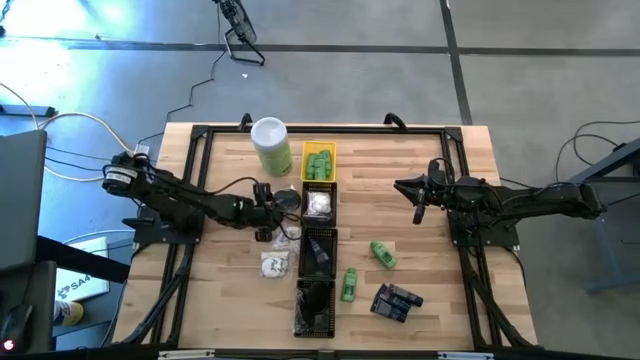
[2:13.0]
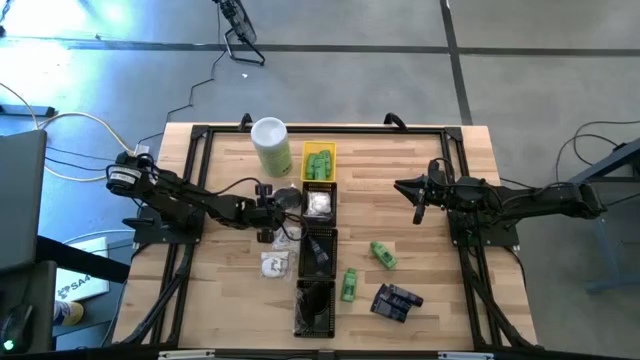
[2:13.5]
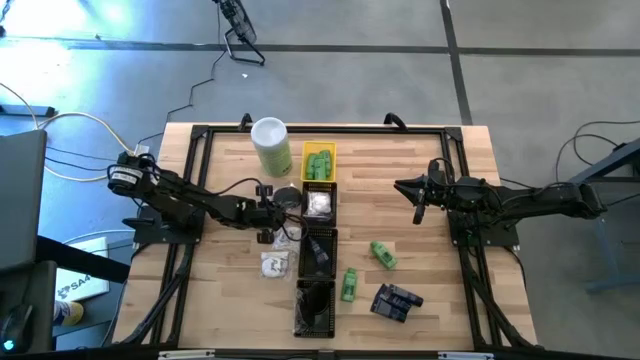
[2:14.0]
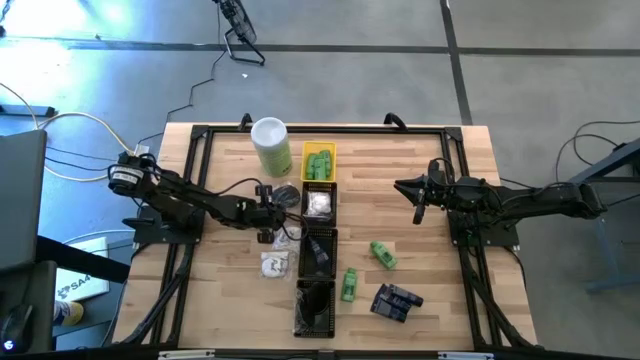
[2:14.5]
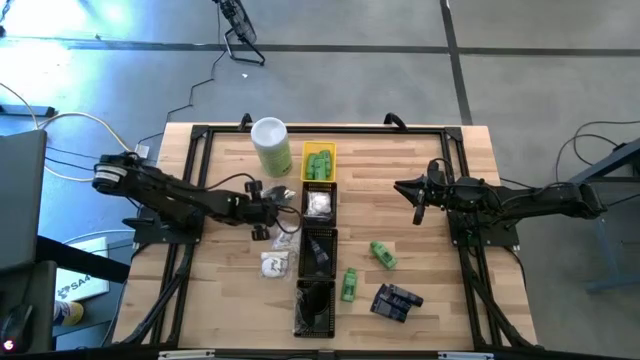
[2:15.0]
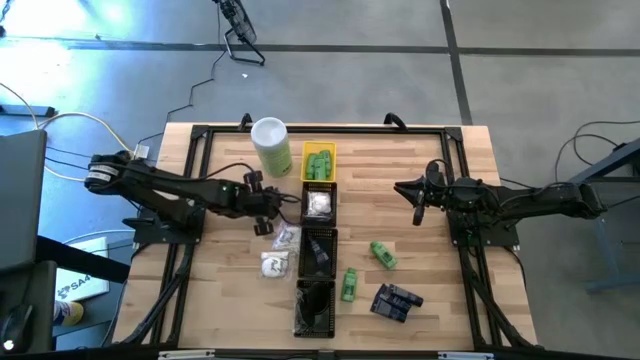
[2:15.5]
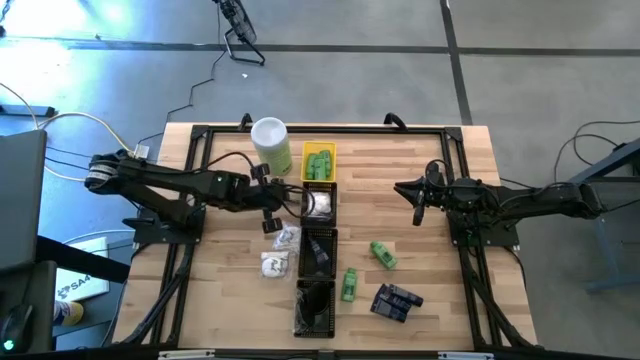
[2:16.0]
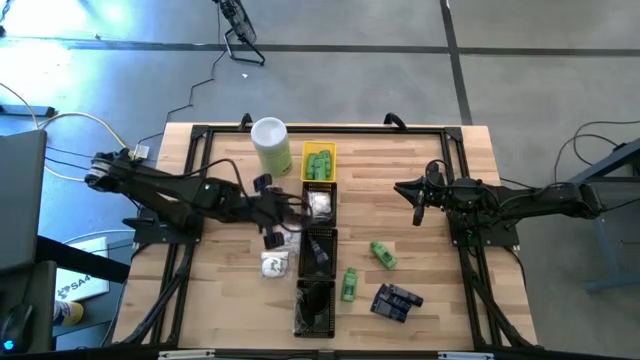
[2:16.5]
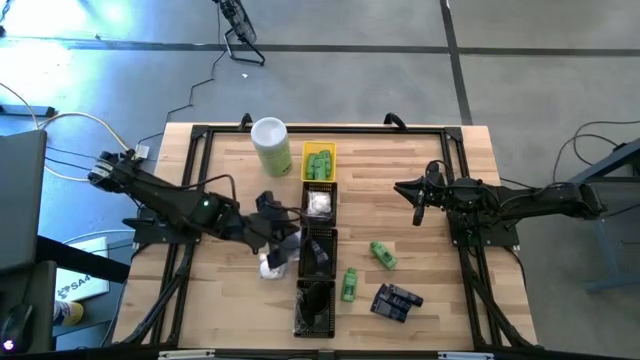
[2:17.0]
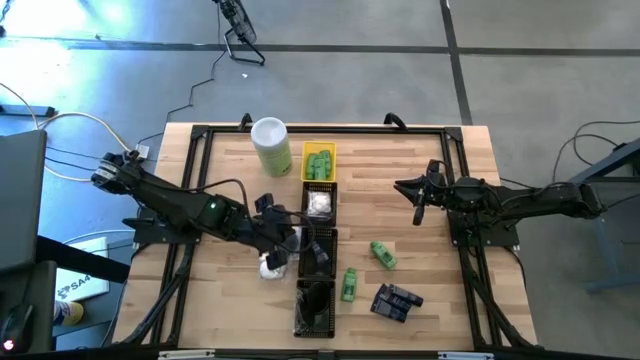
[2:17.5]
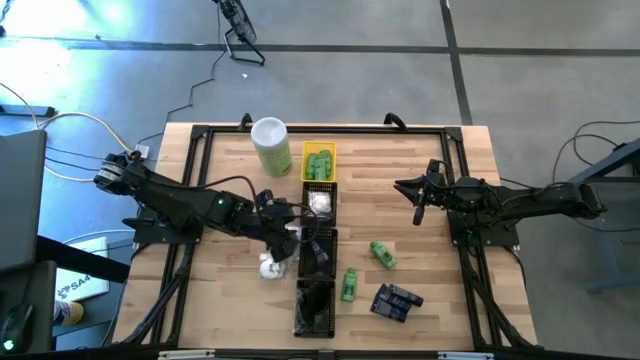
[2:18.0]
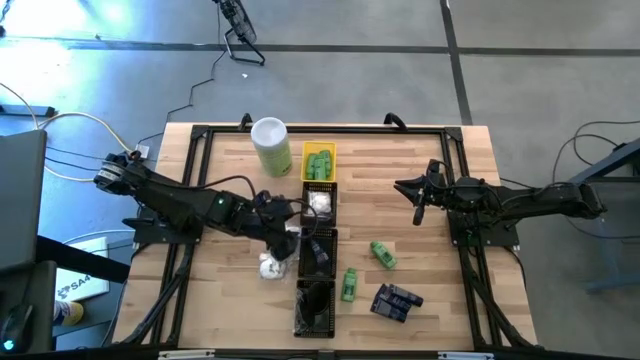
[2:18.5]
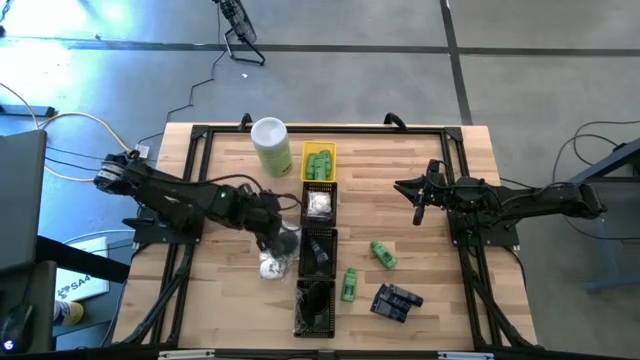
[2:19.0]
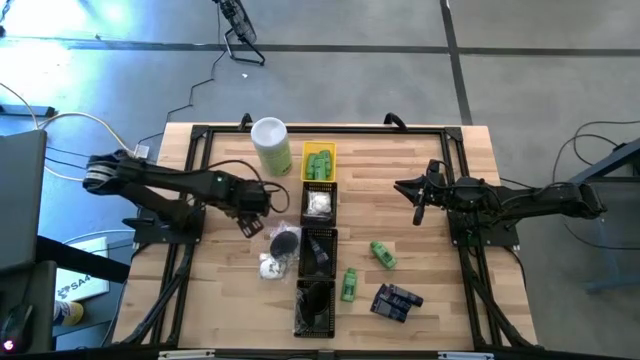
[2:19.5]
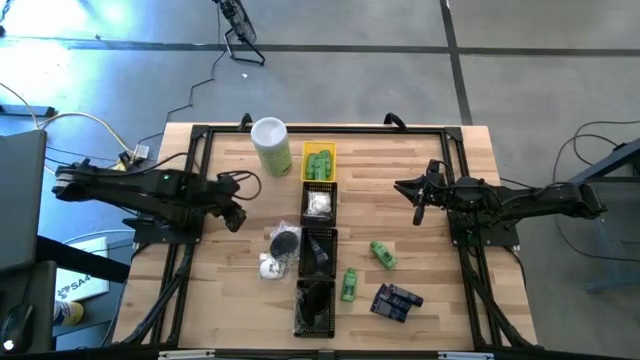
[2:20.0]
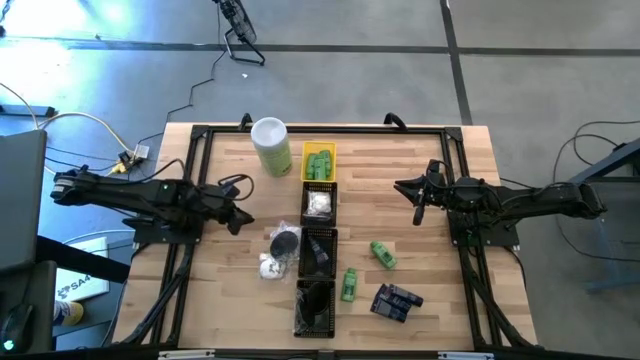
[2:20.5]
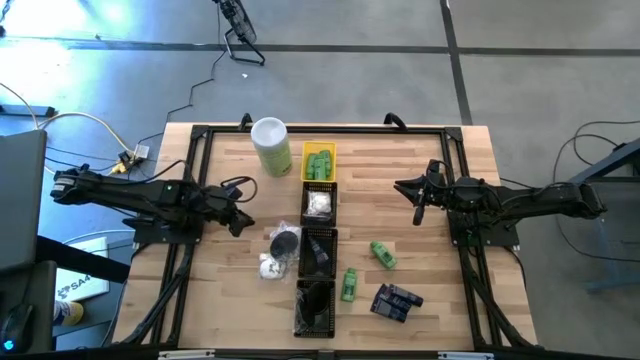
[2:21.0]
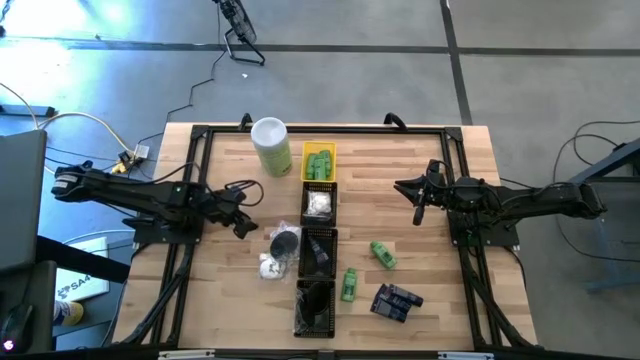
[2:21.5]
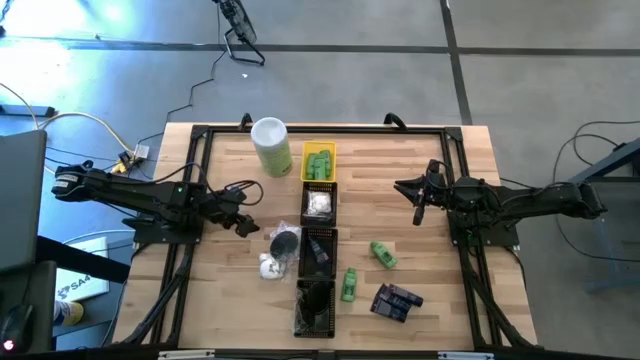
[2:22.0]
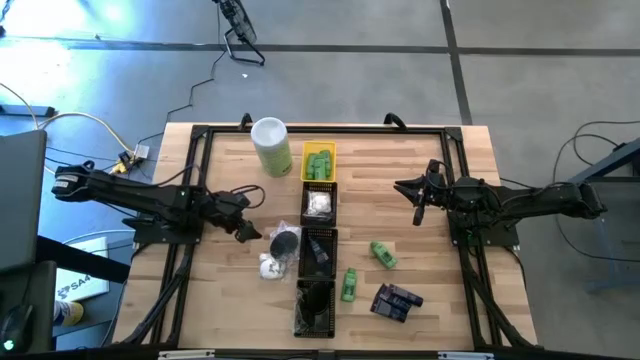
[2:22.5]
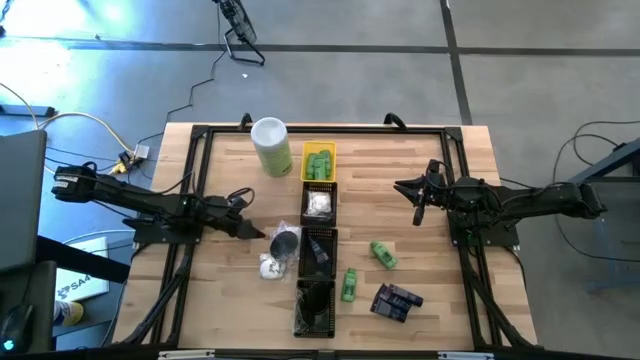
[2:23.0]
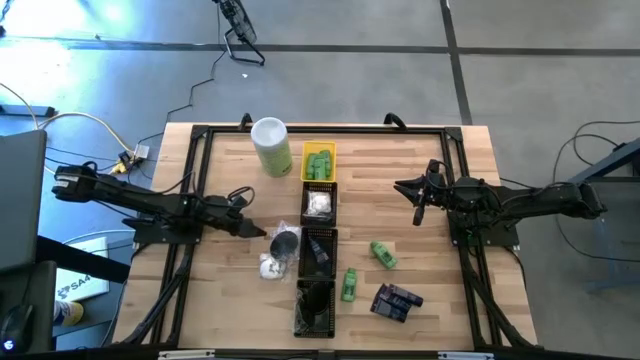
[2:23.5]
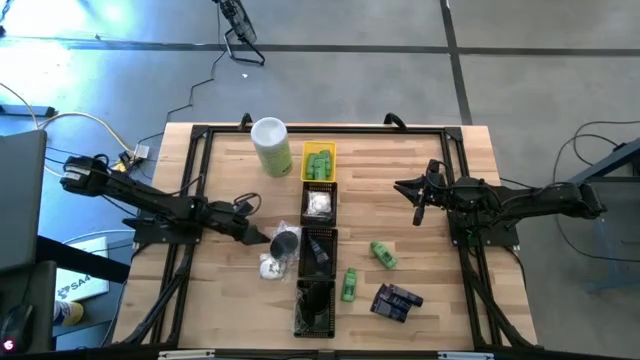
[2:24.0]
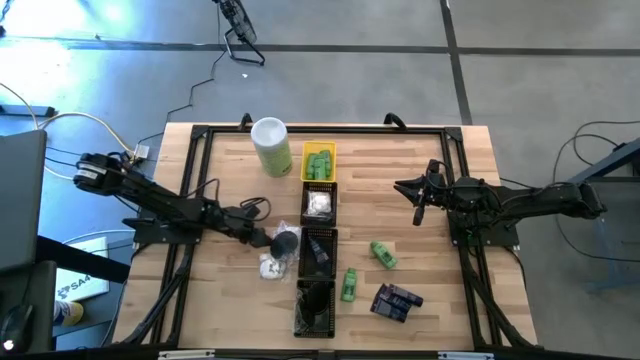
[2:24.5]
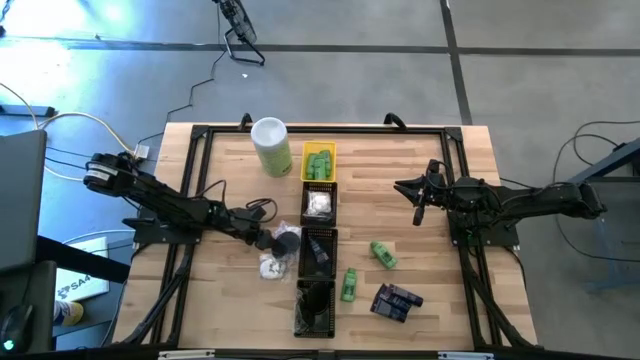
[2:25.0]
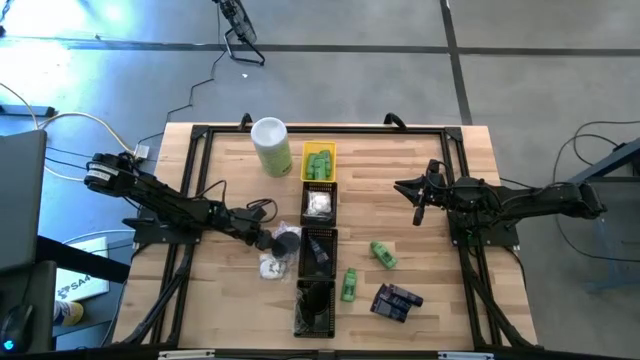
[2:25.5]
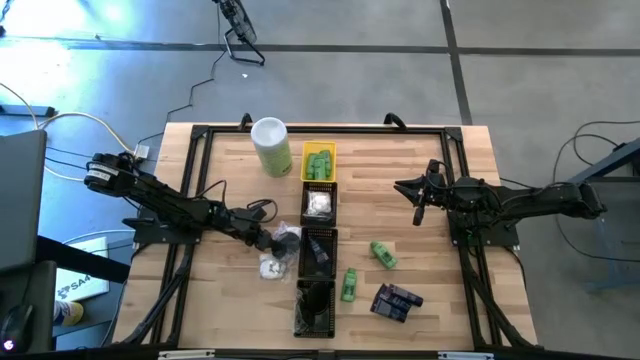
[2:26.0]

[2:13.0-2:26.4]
Task: Pick & Place Travel size toiletries
Put the black hairbrush into the bottom black basket

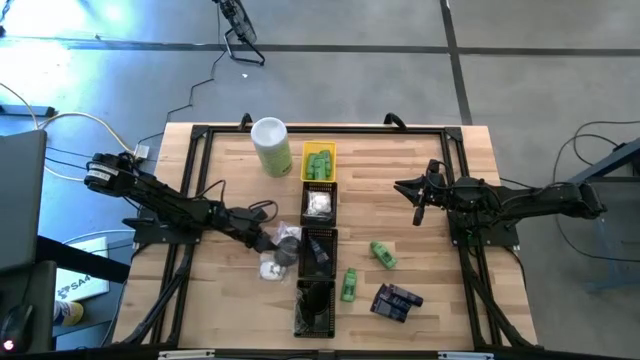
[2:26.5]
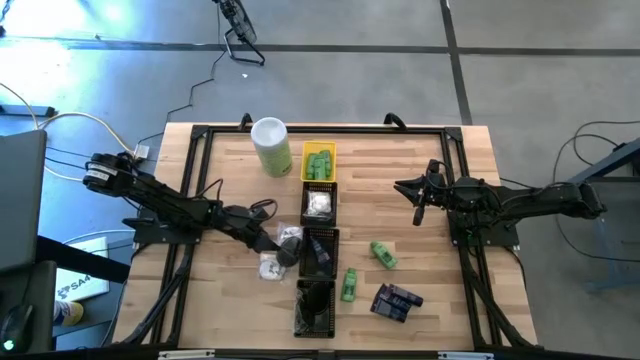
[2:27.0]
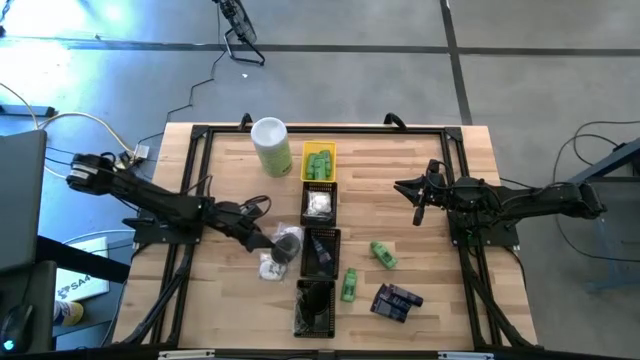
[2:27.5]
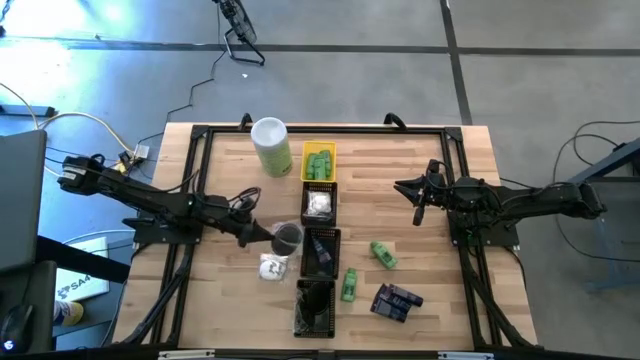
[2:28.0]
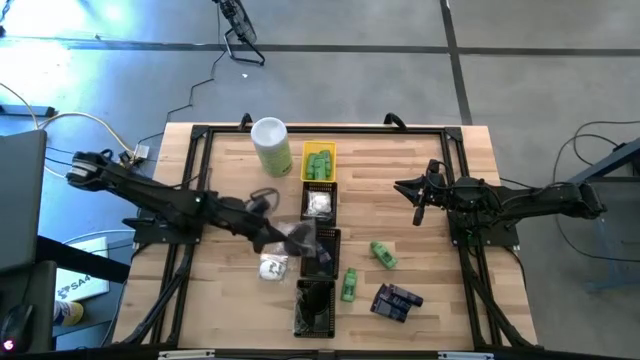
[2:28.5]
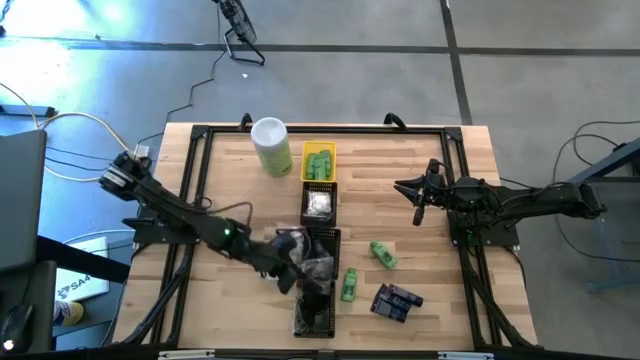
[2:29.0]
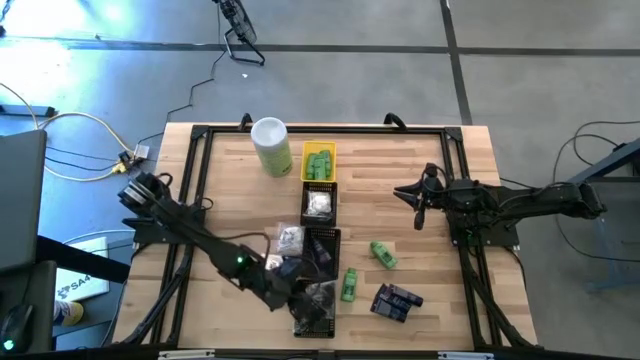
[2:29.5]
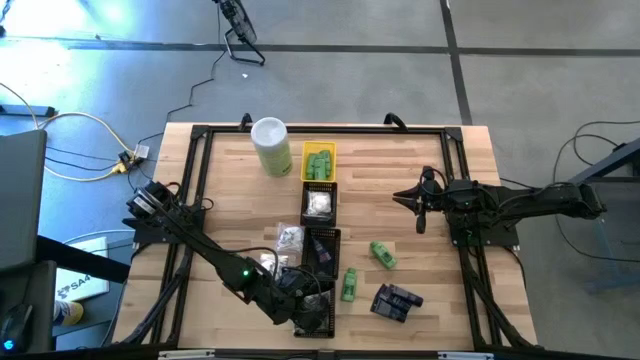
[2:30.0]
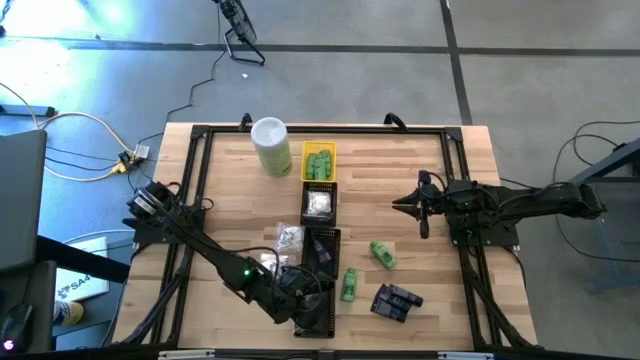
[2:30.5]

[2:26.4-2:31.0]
Put the black hairbrush into the bottom black basket

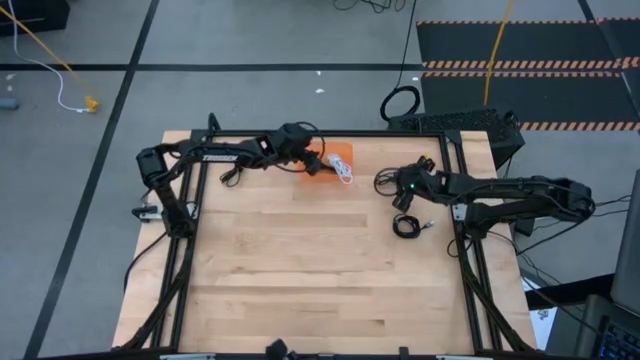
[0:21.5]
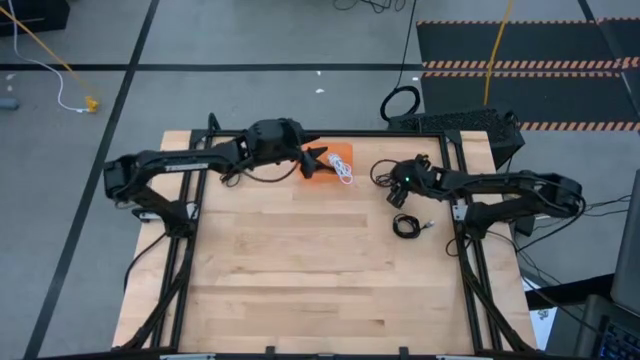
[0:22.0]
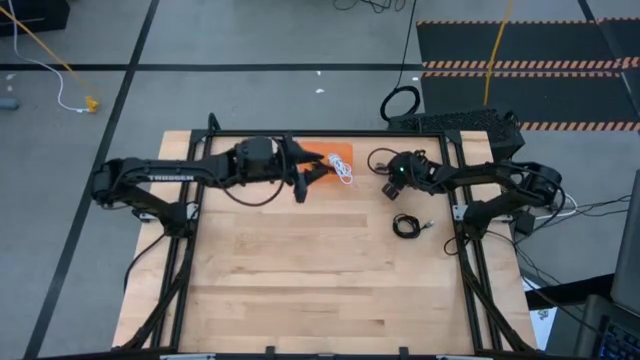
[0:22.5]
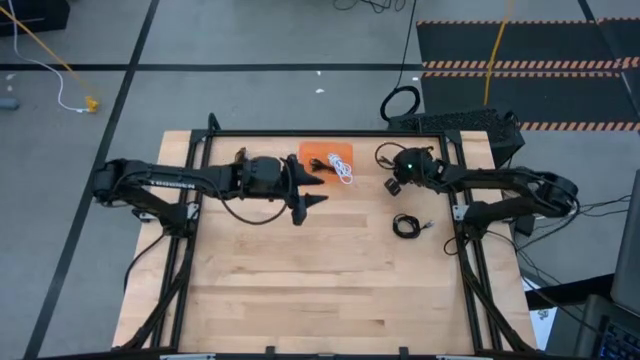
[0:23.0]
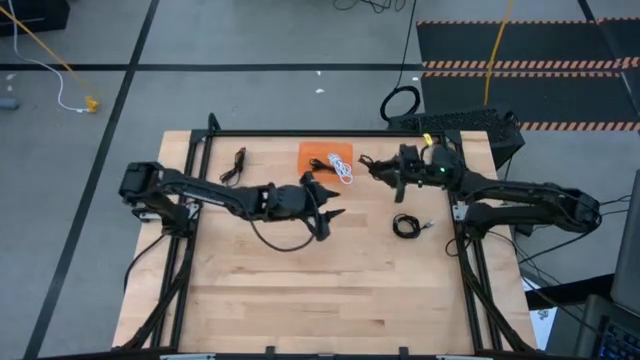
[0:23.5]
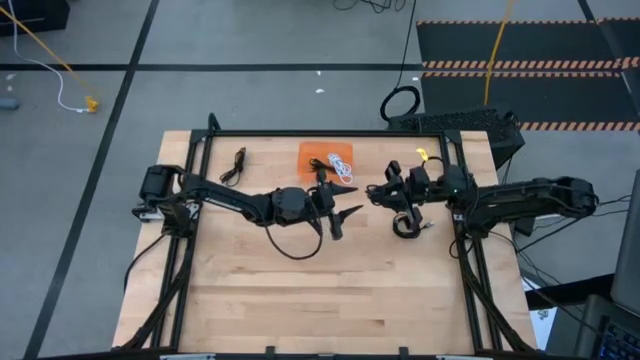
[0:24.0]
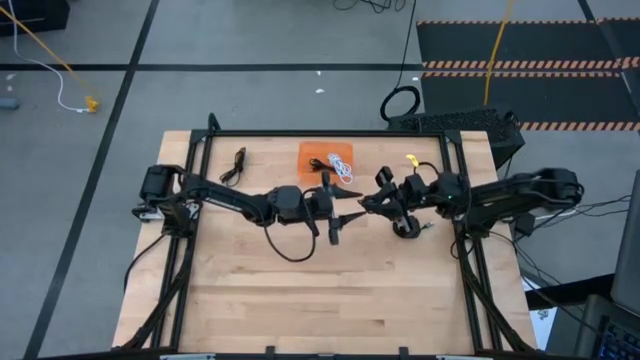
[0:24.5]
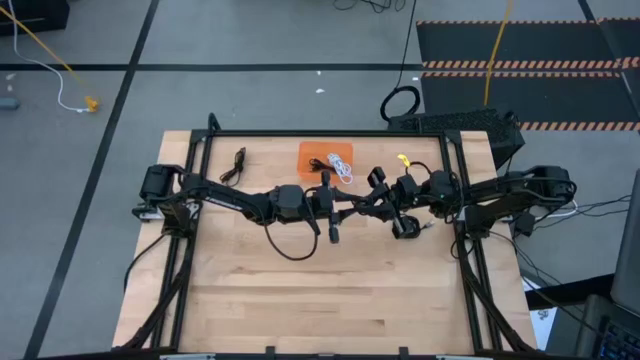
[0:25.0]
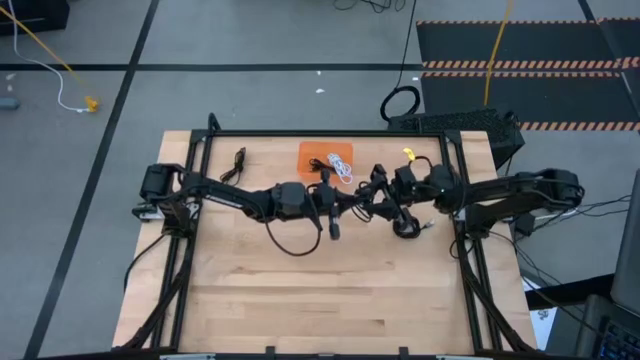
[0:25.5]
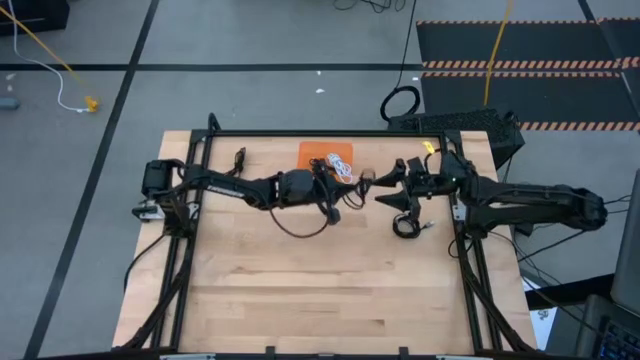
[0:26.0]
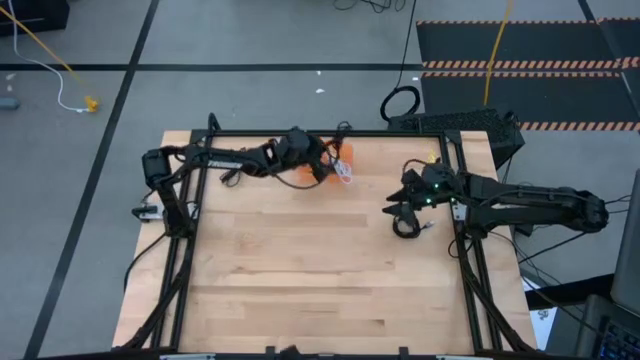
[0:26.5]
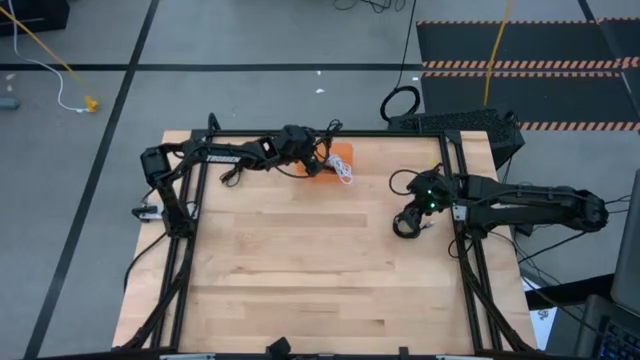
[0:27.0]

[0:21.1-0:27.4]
Task: Pick and place USB-C Cables
Put the black charger cable into the orange bin
